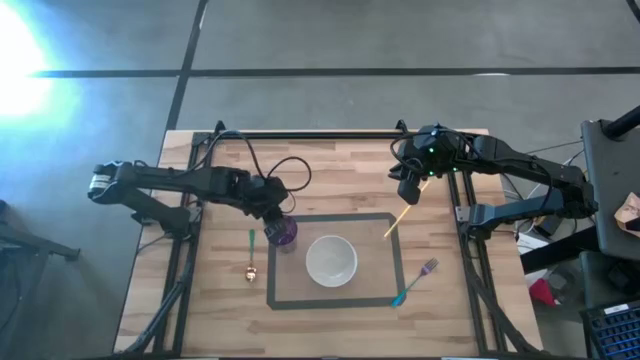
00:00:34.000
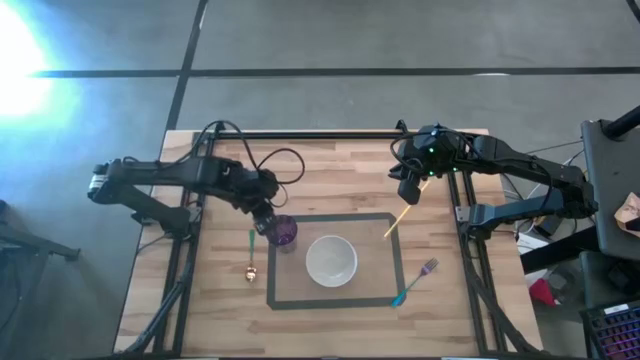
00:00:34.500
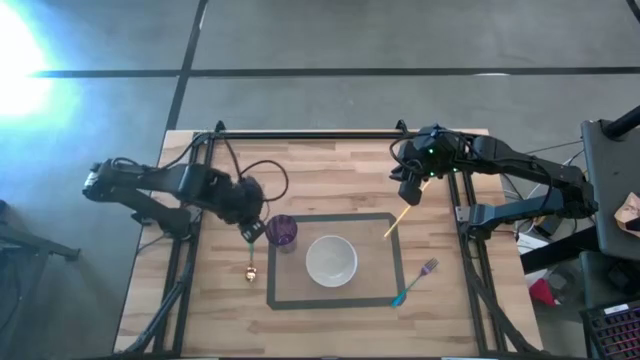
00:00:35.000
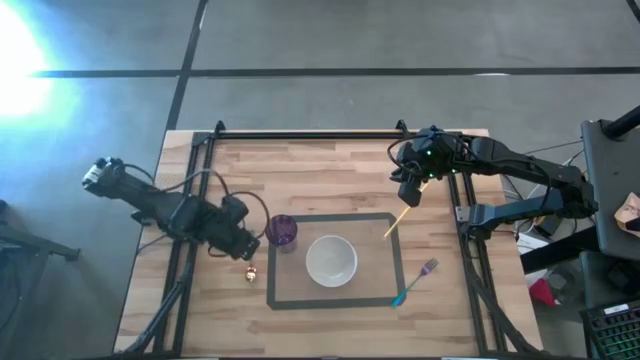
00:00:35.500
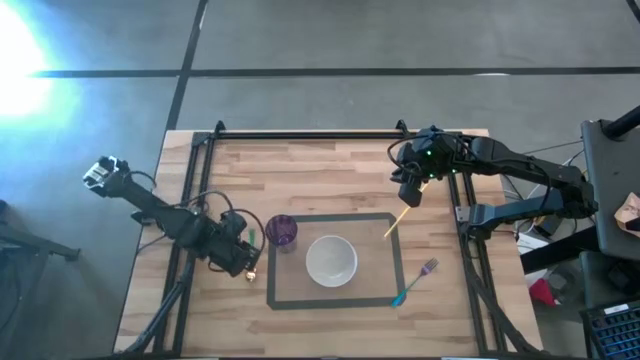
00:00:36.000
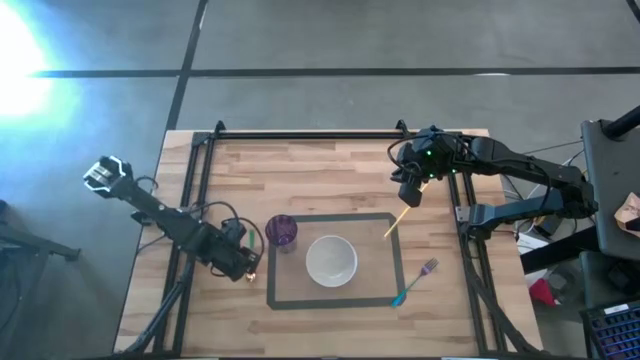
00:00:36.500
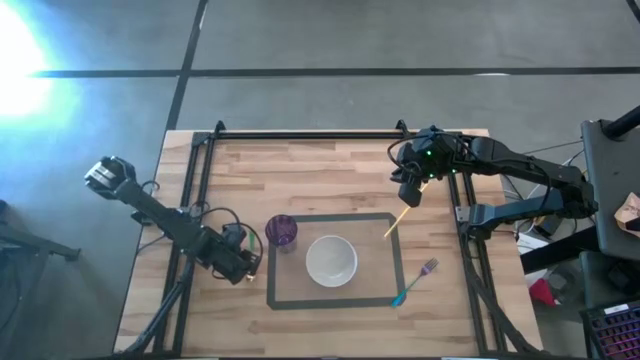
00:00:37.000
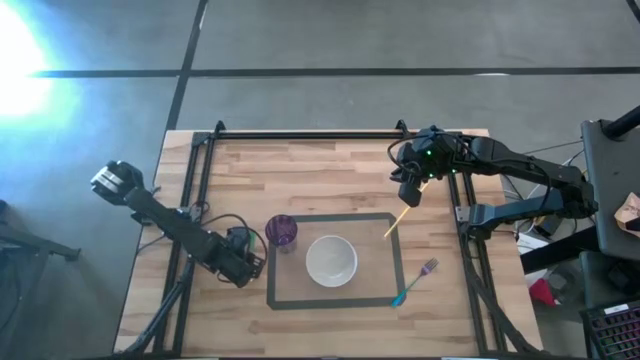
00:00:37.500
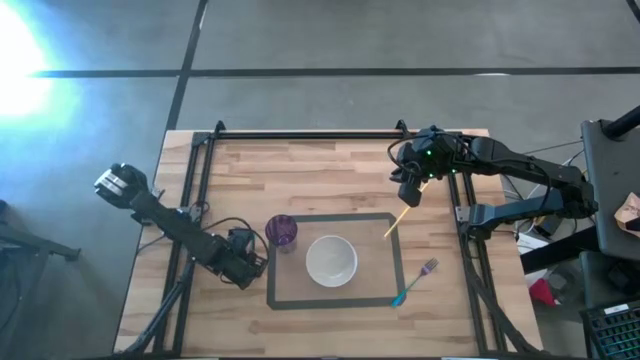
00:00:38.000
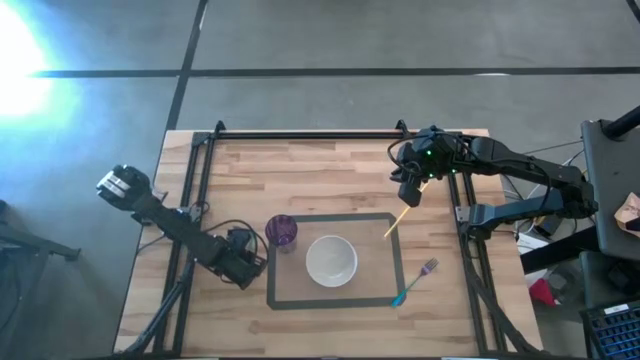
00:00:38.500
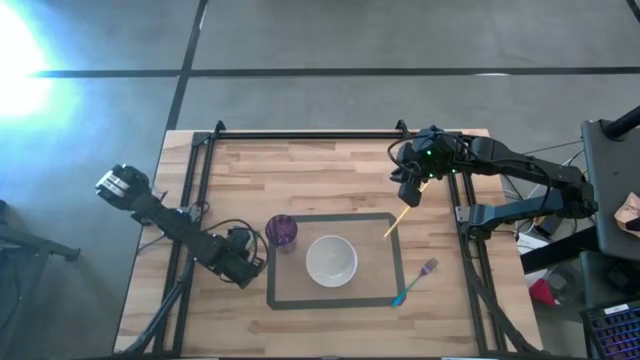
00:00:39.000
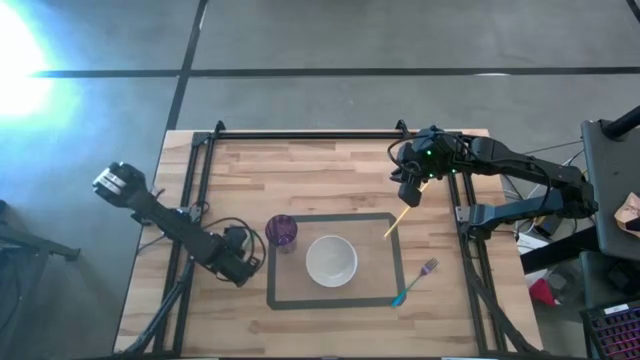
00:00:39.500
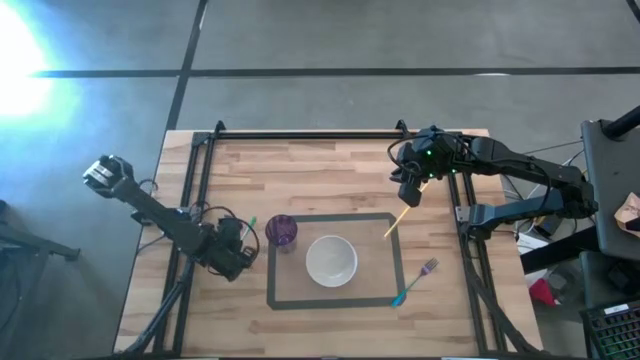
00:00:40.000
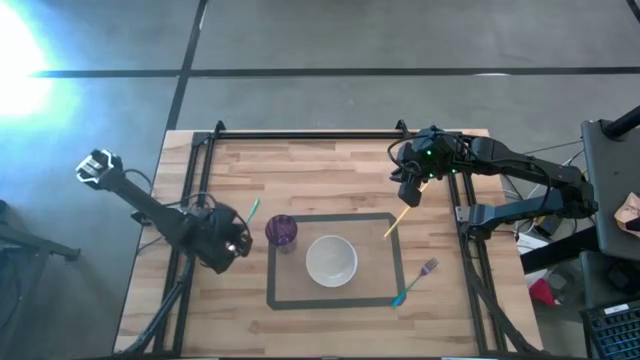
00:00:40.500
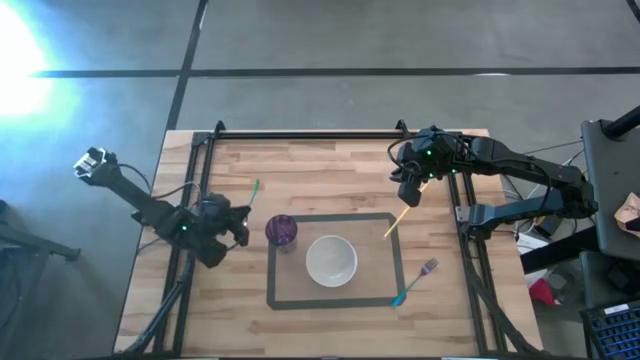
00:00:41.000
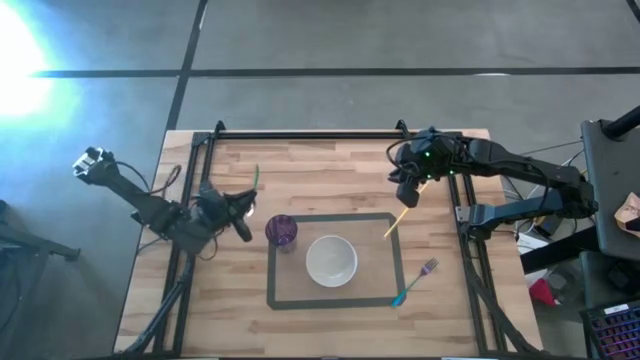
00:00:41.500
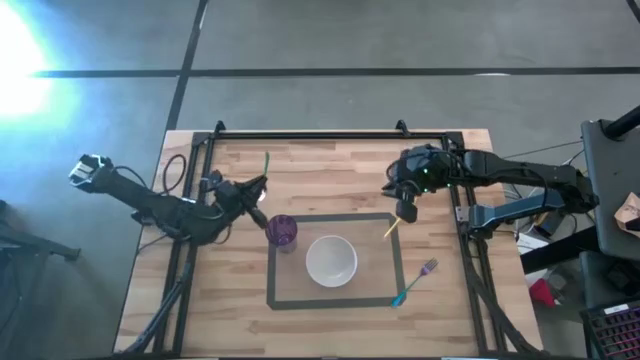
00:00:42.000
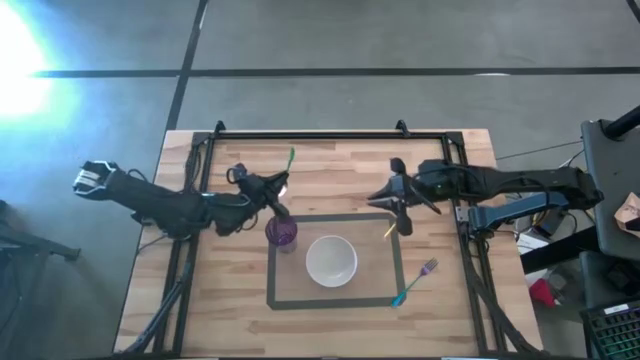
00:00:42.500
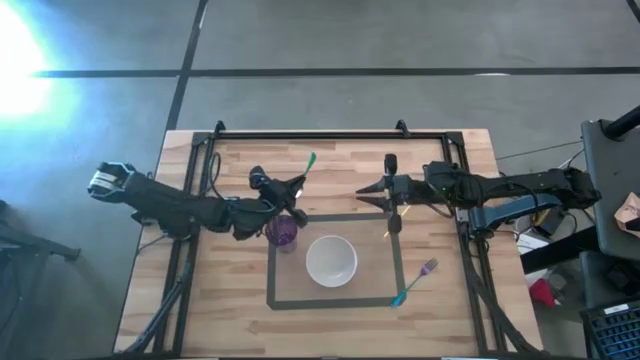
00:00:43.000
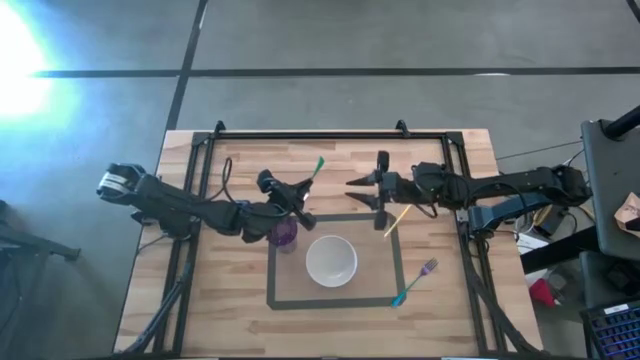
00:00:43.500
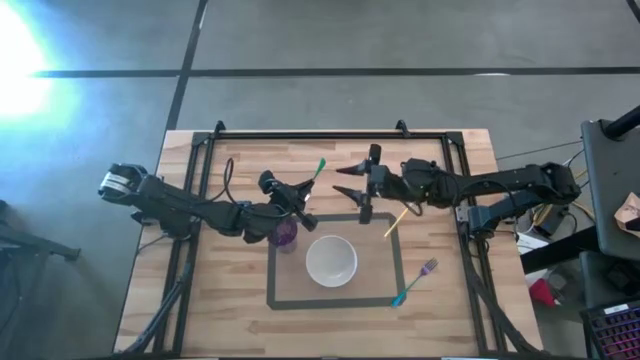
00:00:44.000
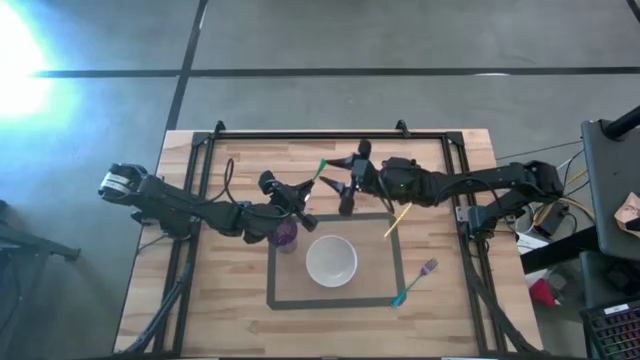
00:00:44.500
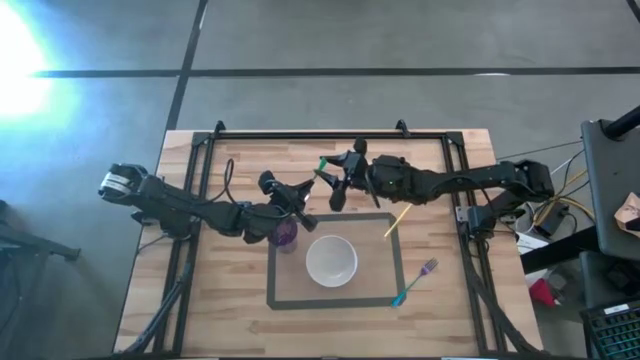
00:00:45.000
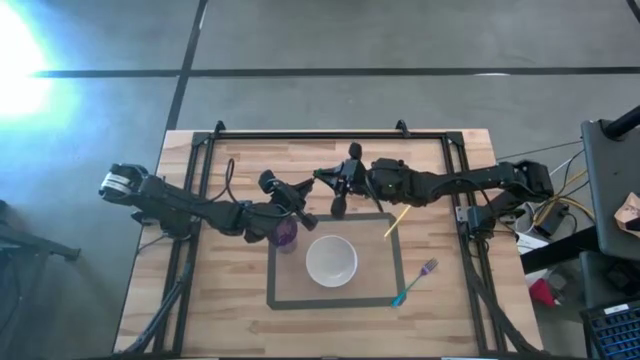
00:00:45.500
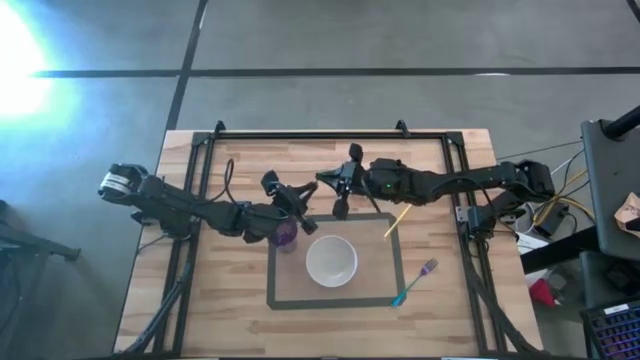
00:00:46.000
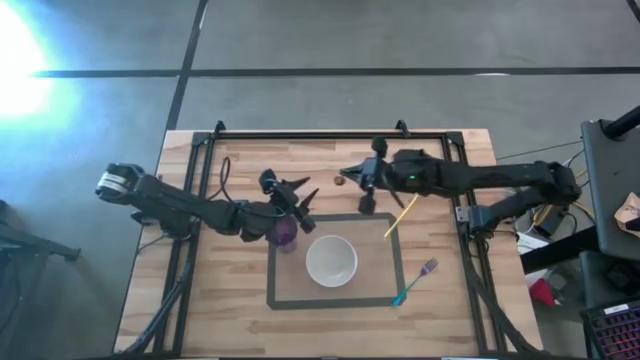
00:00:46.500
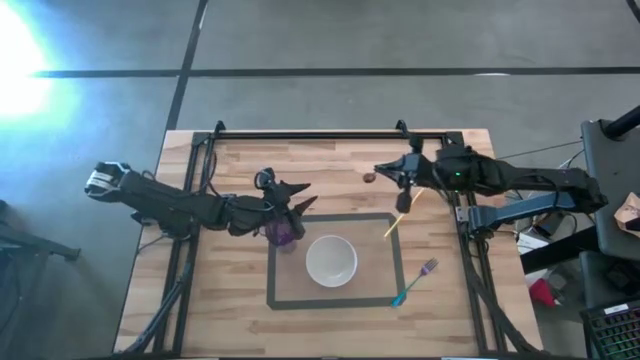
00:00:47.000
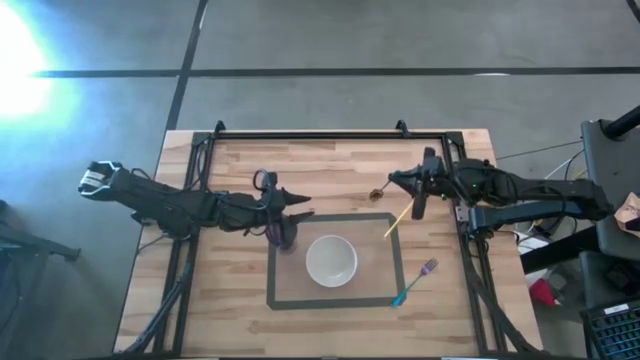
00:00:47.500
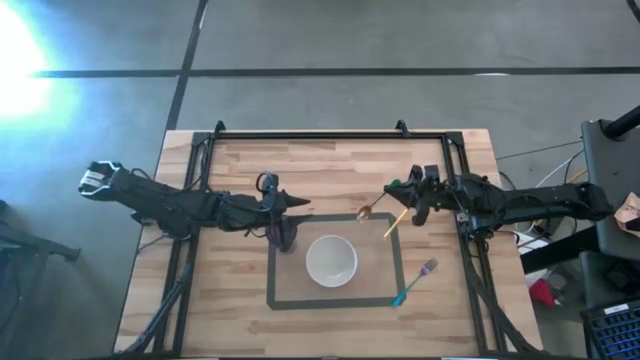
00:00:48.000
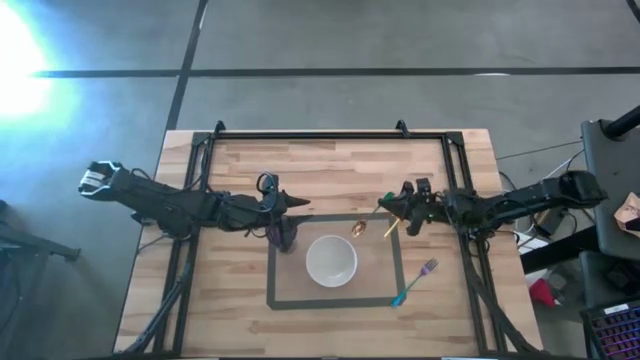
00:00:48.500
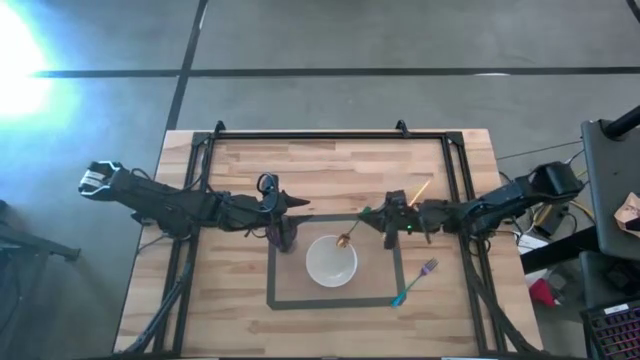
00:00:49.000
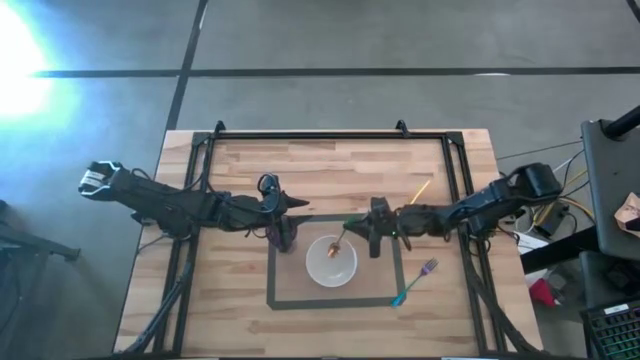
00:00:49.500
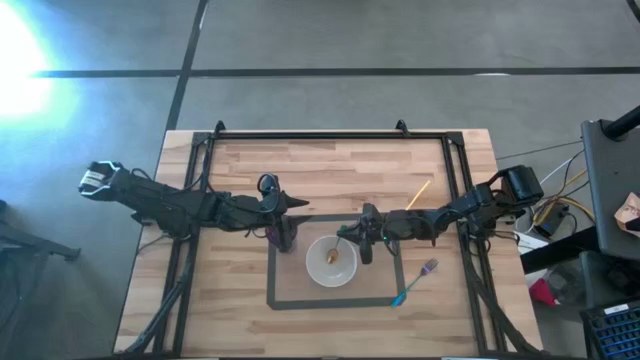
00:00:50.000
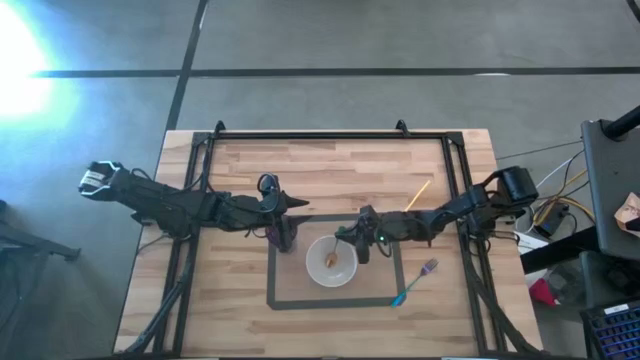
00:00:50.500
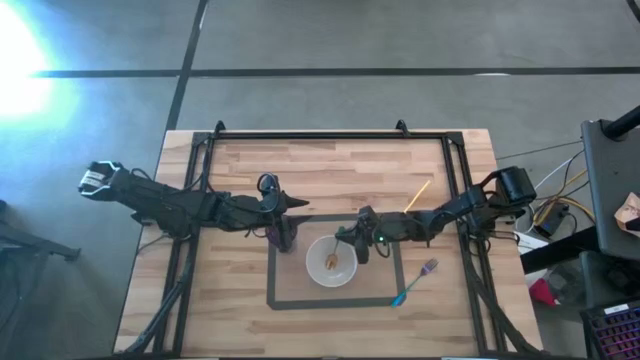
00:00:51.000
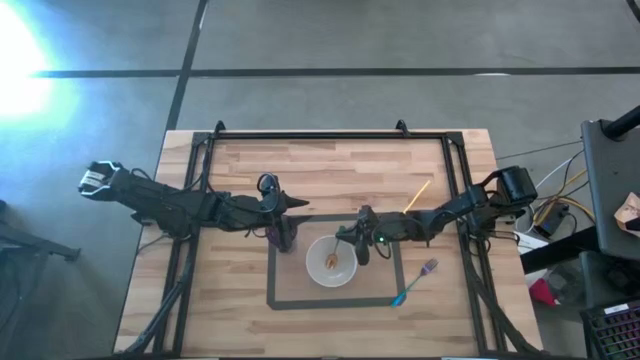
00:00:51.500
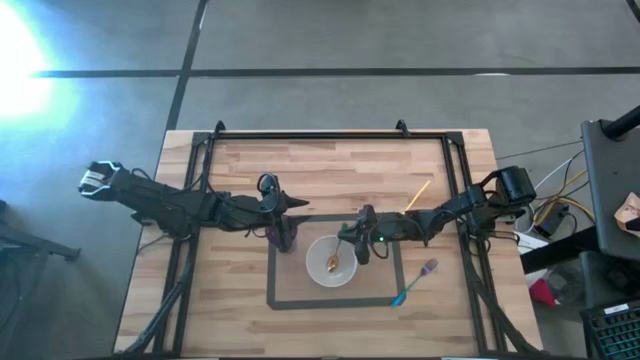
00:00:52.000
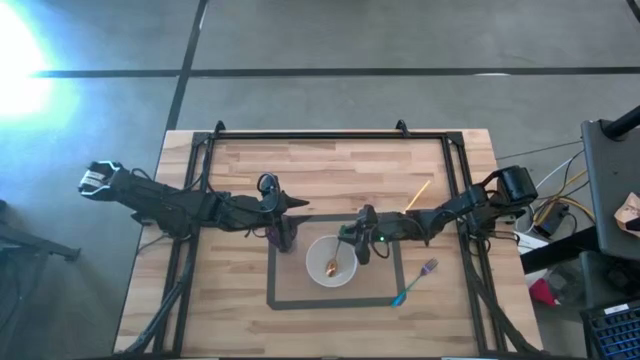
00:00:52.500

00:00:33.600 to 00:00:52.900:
Task: Pick & Place Utensil
Put the green spoon into the white bowl

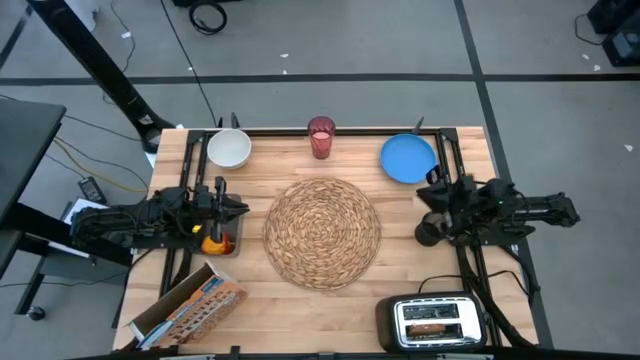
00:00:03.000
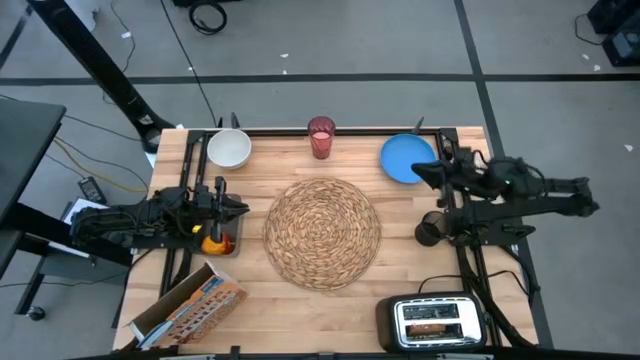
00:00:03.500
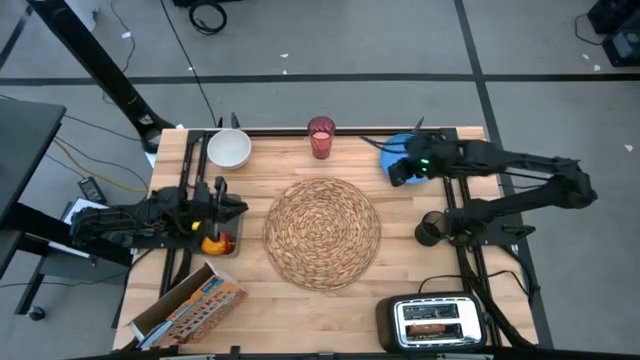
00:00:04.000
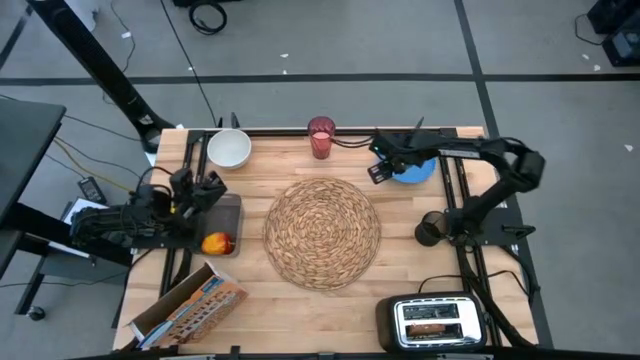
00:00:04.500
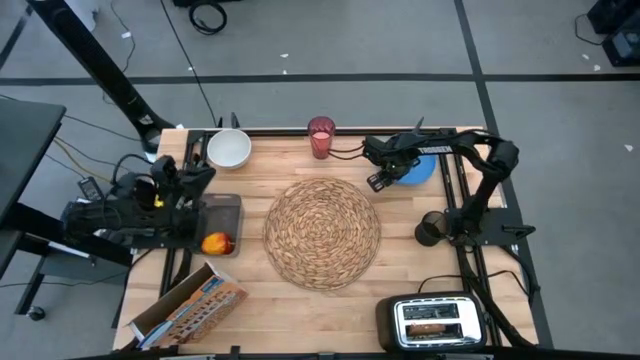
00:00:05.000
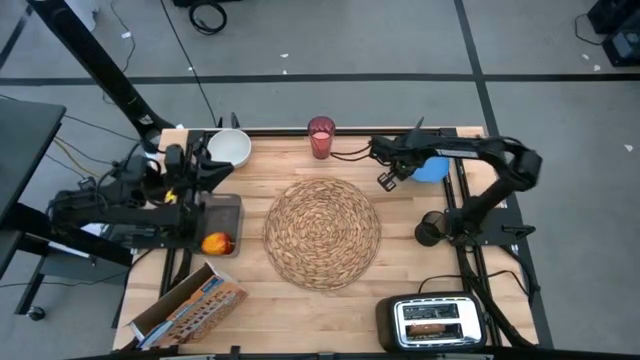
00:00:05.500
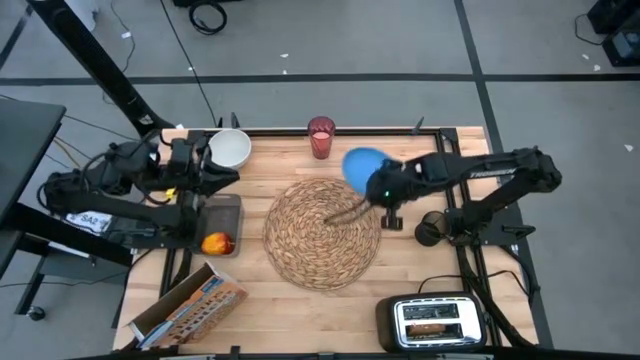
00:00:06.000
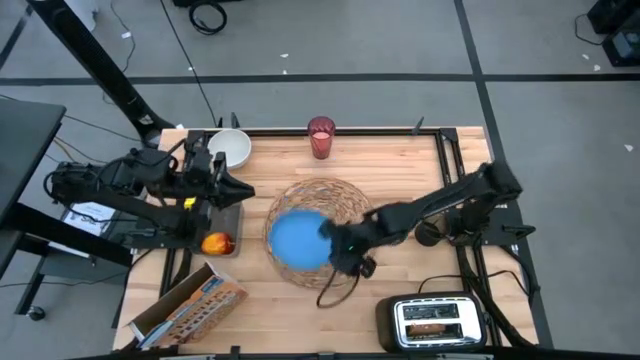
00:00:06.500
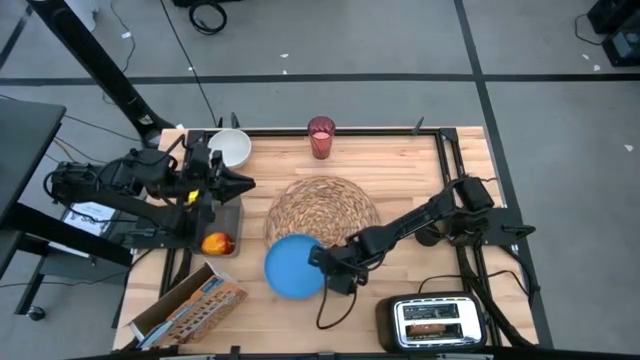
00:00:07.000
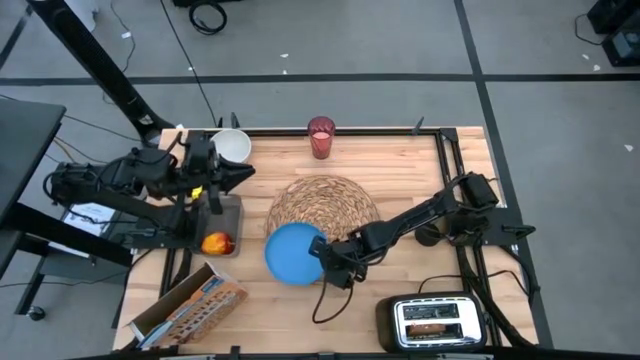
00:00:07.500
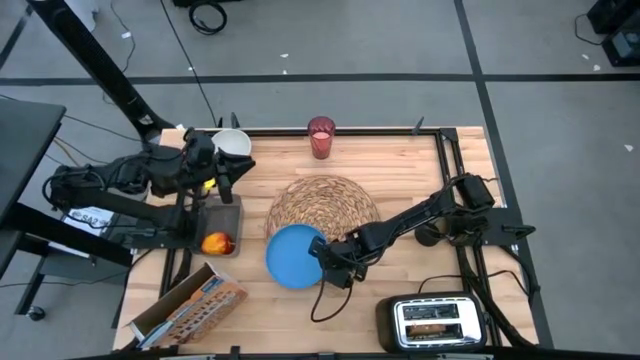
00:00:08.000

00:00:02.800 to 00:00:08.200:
Task: Arrange a breakfast setting
Put the plate on the woven placemat
